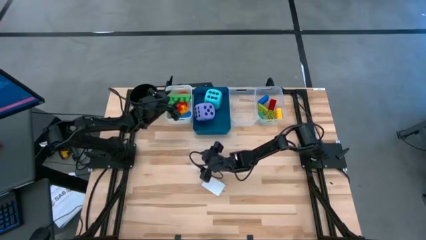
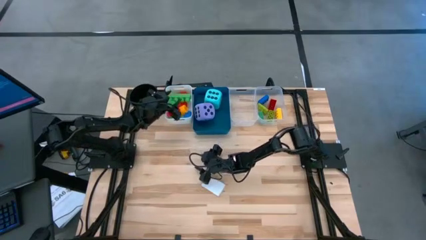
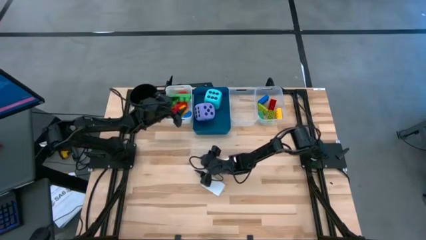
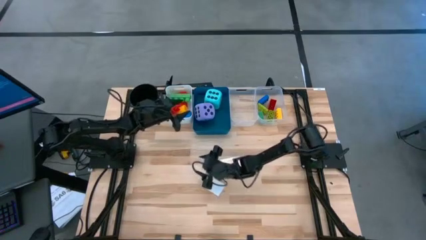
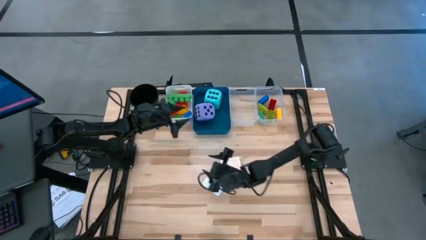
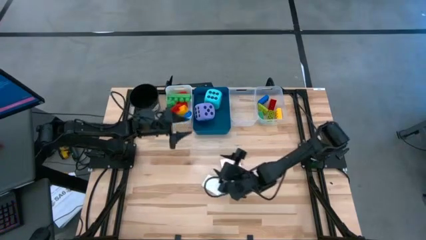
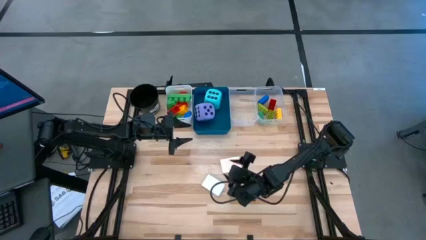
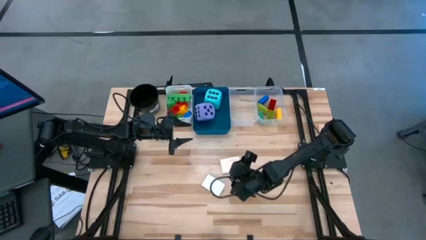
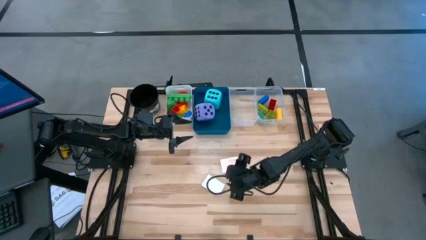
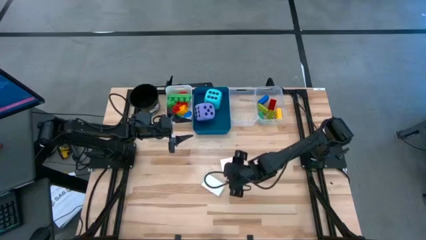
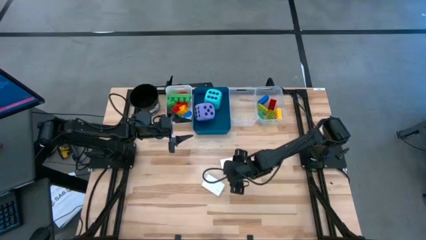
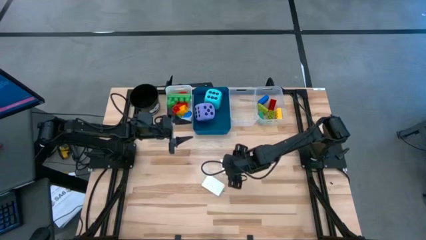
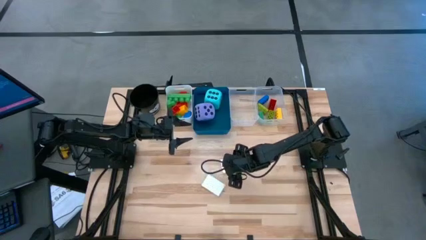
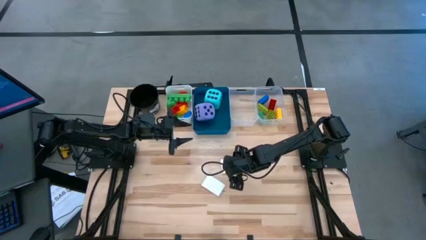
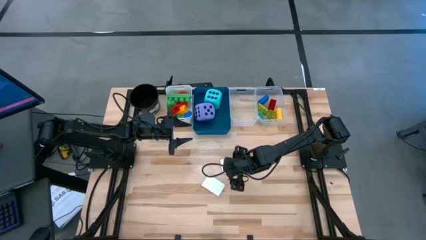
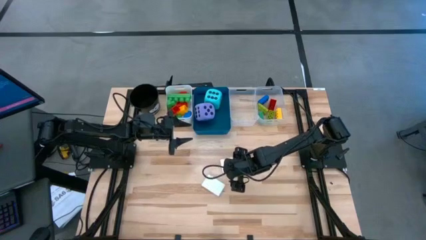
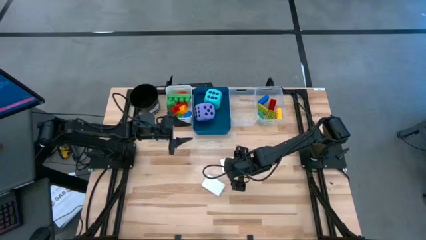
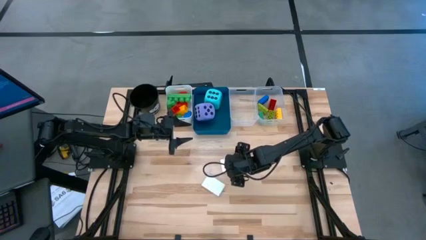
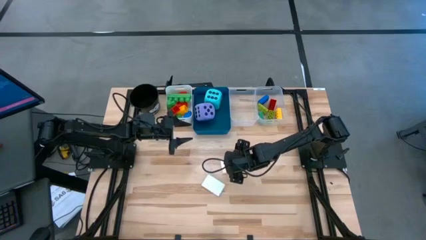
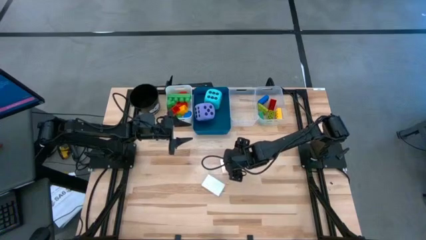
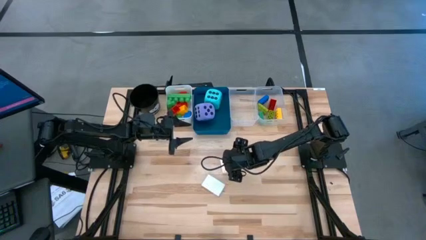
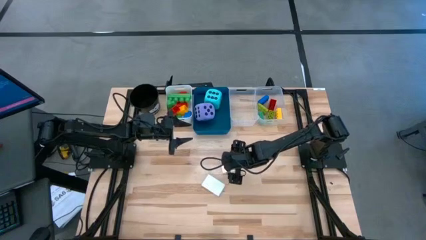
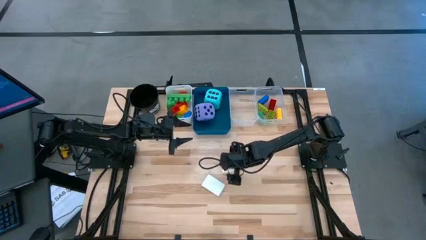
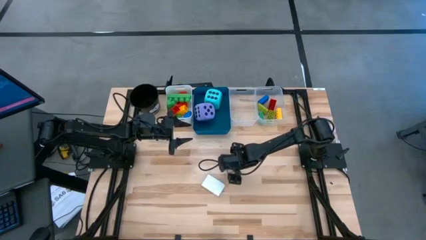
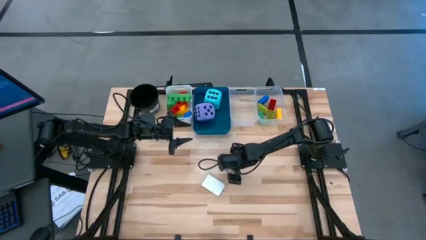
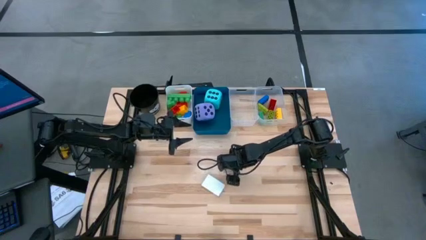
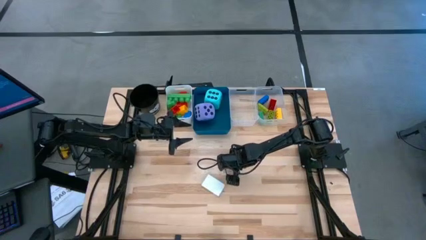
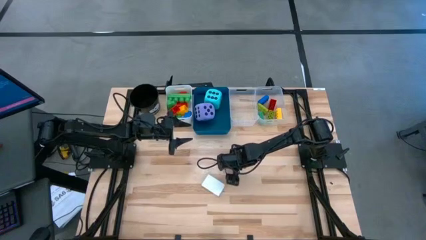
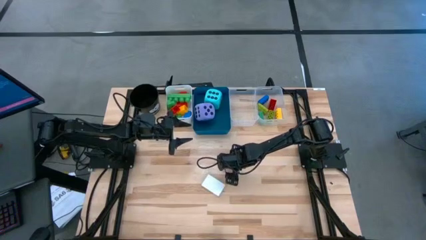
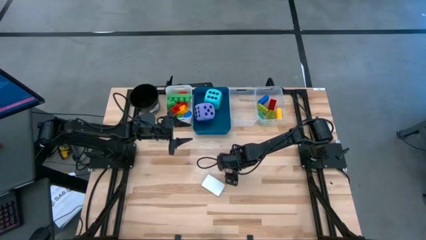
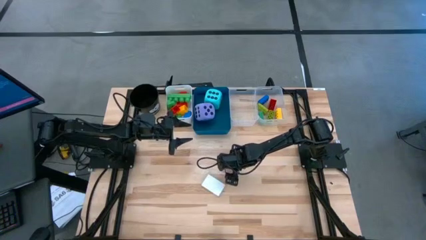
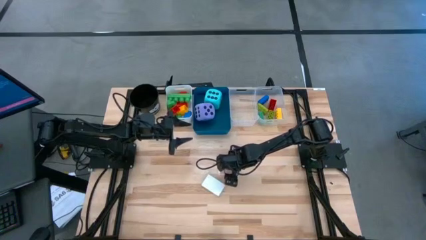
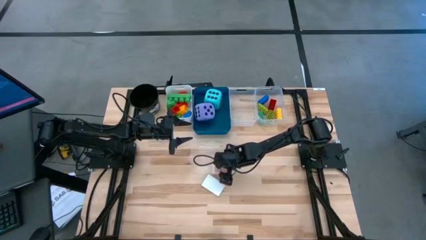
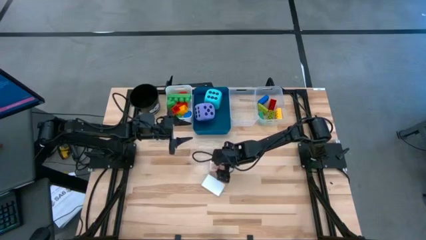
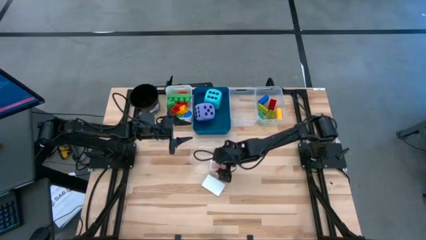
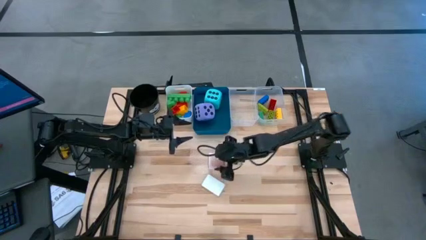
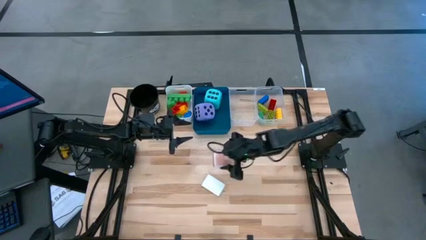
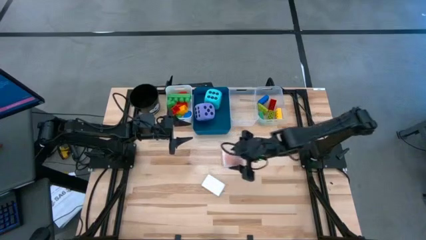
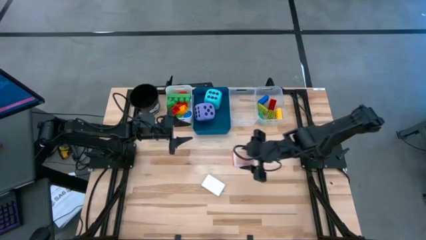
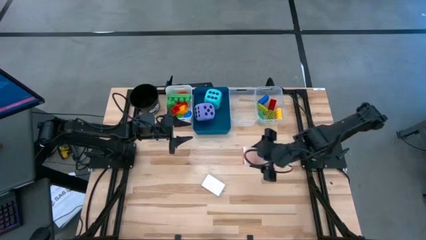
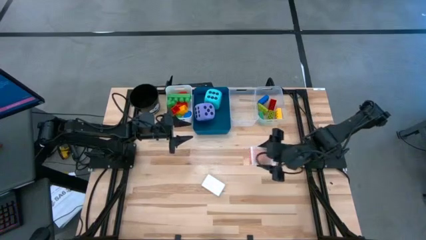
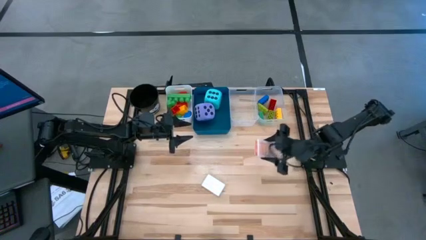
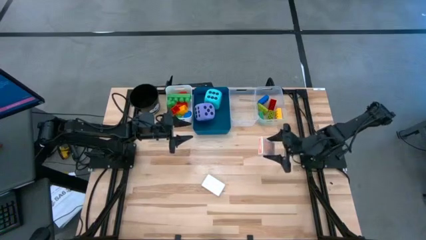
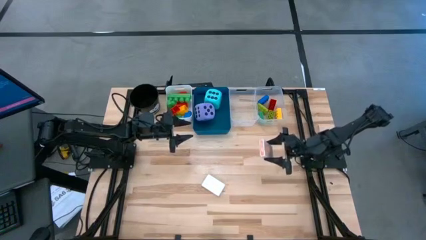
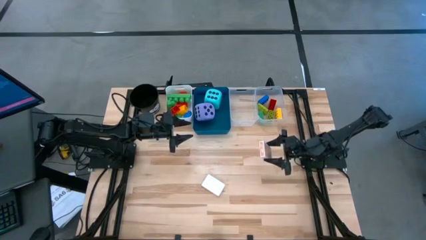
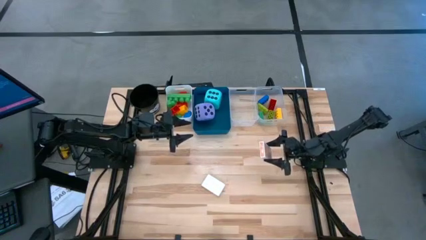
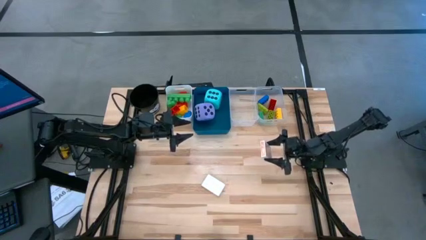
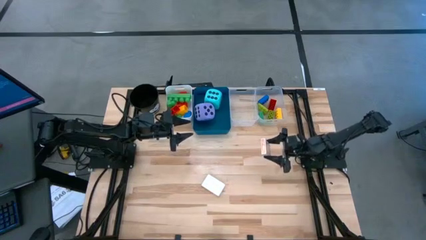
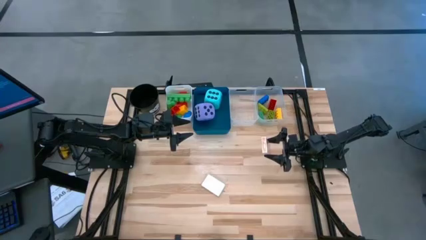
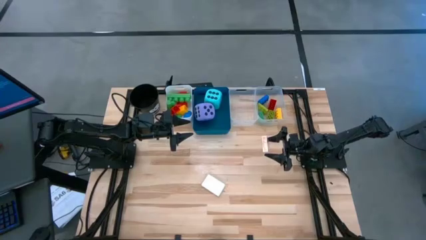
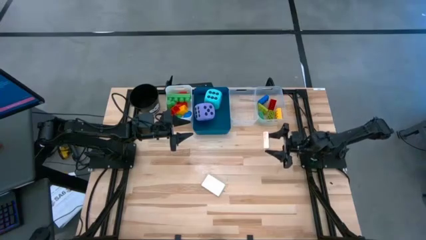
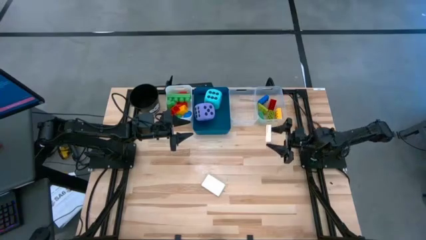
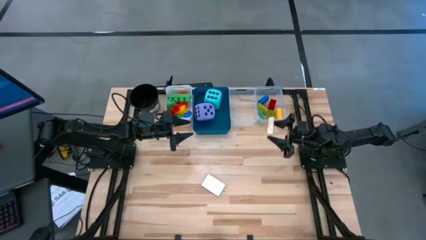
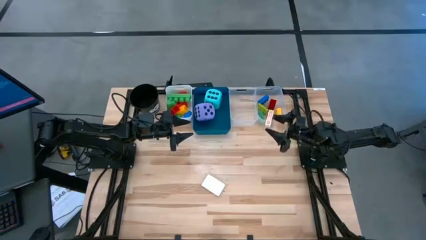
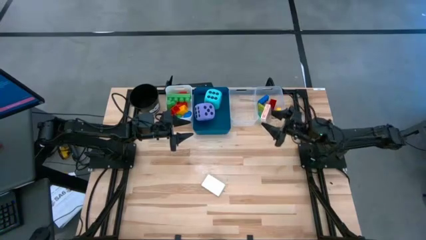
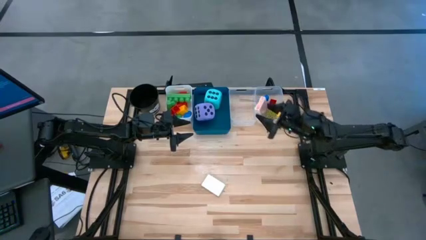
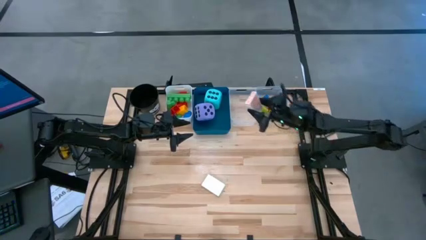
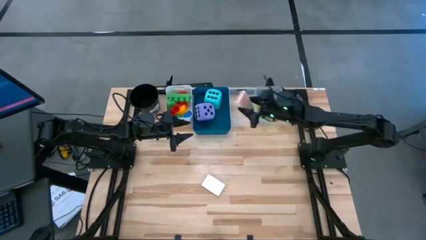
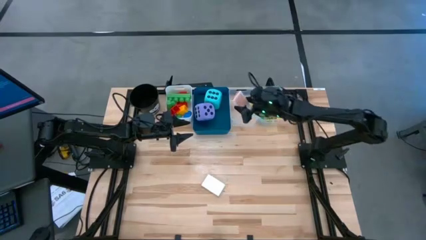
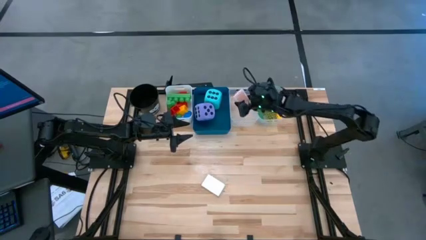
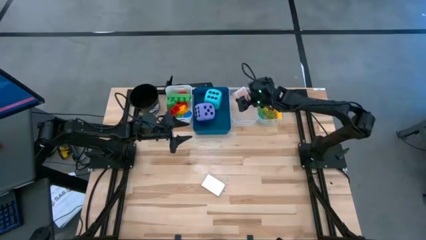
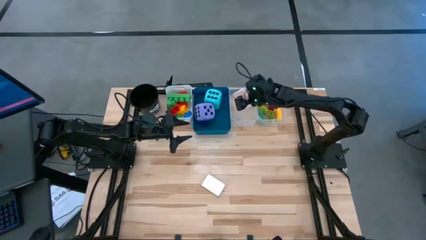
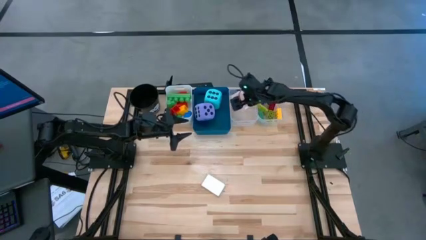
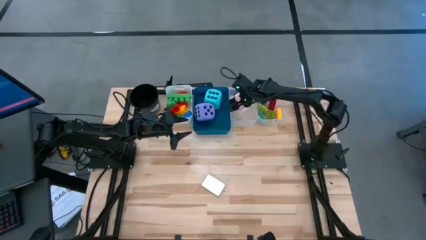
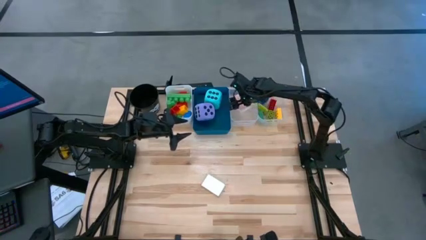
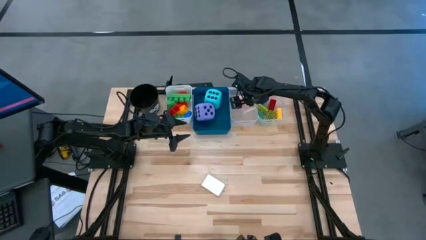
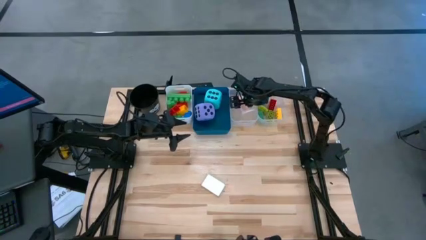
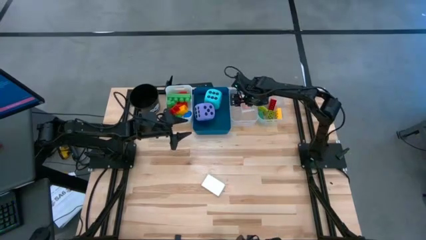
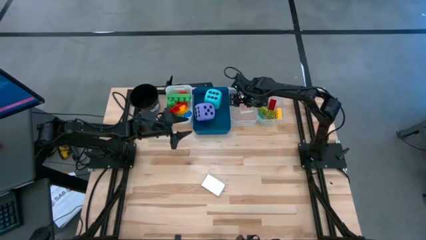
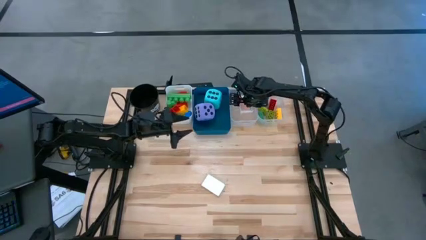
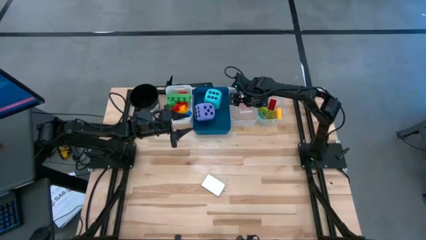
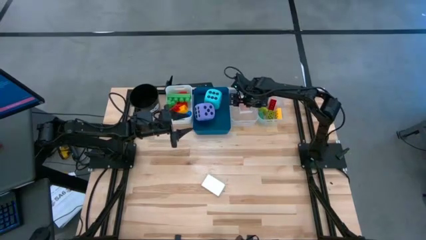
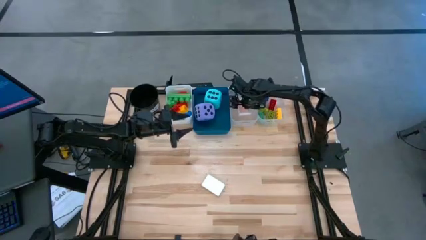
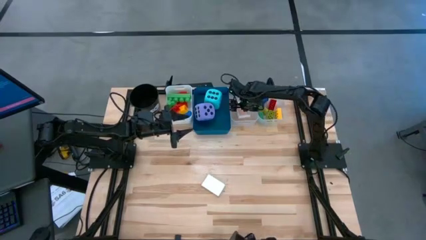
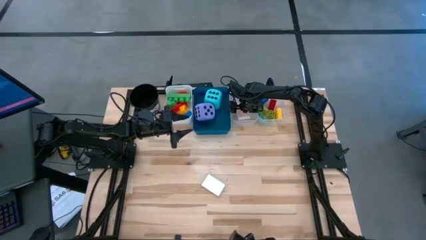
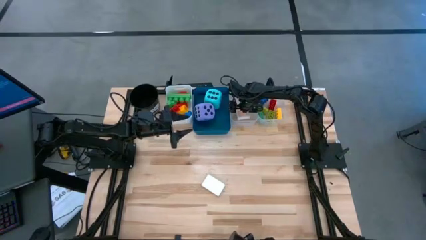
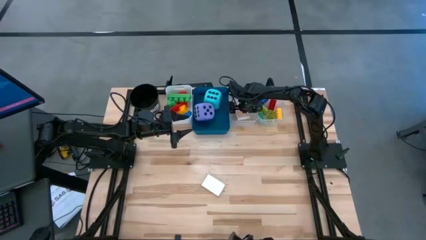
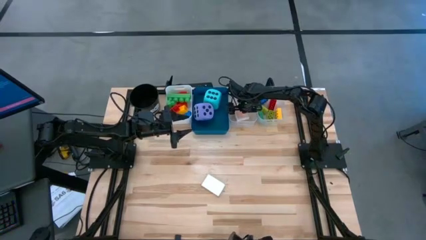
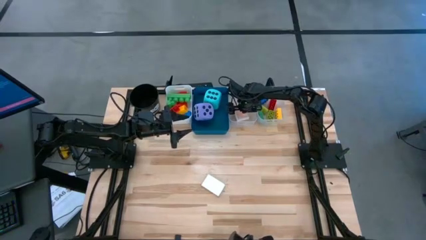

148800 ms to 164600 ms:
Task: Pick & Place Toys
Put the orange game card into the left transparent bin
